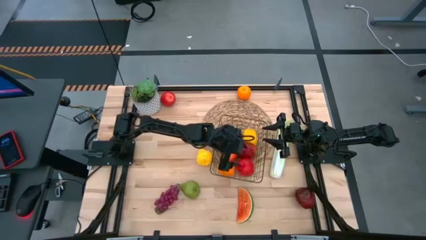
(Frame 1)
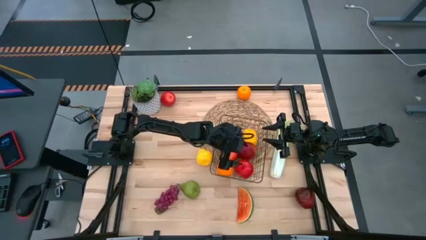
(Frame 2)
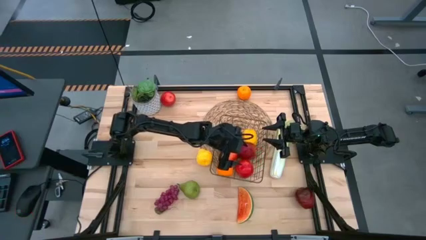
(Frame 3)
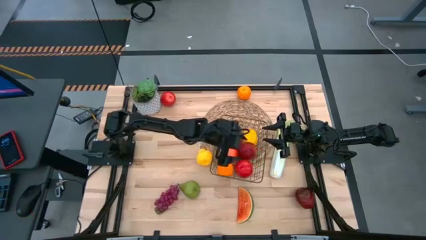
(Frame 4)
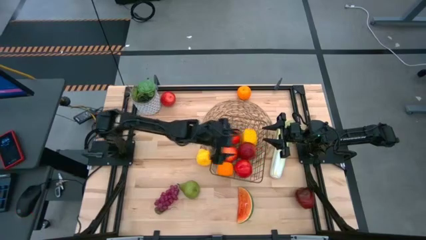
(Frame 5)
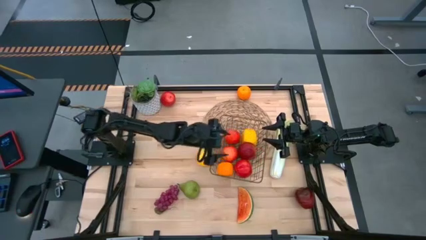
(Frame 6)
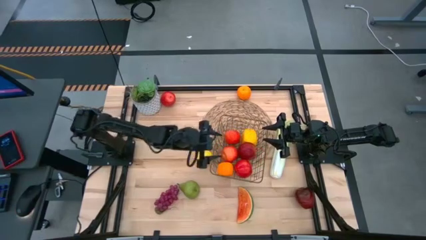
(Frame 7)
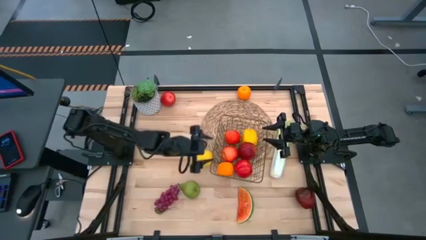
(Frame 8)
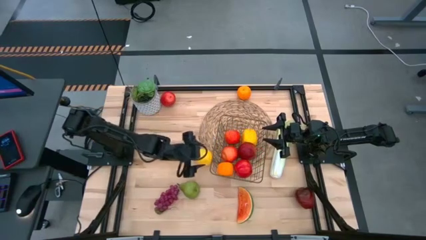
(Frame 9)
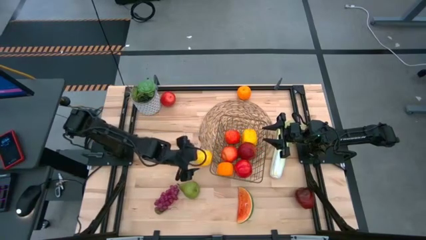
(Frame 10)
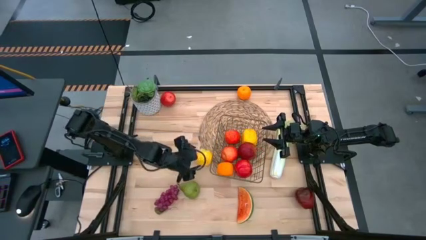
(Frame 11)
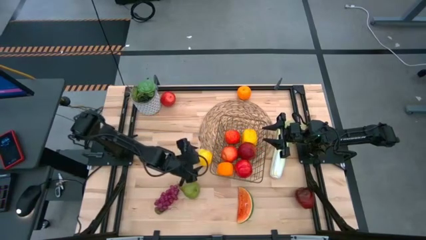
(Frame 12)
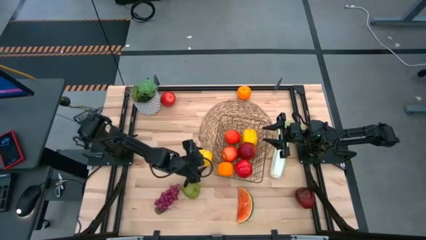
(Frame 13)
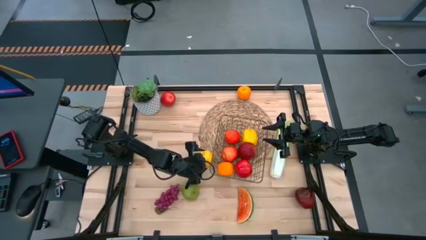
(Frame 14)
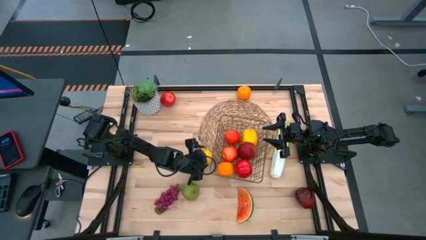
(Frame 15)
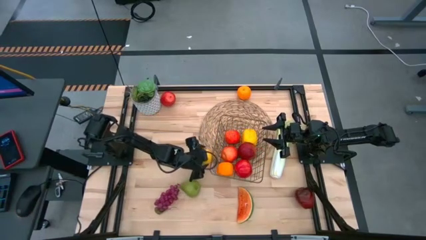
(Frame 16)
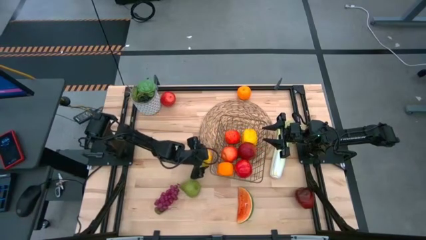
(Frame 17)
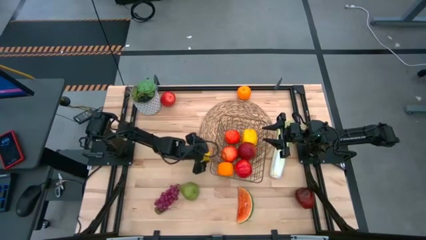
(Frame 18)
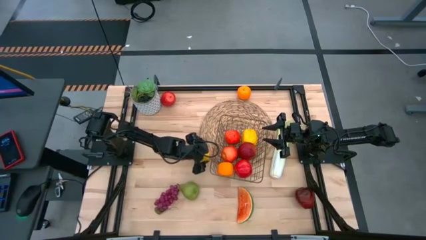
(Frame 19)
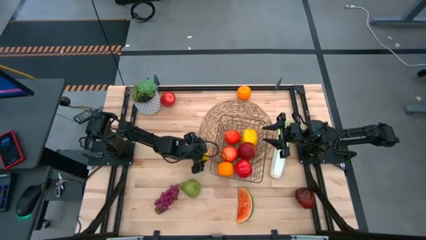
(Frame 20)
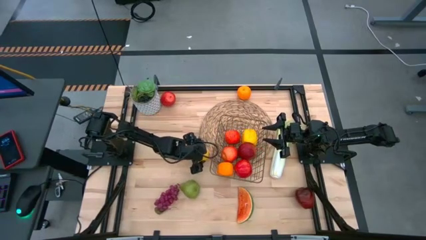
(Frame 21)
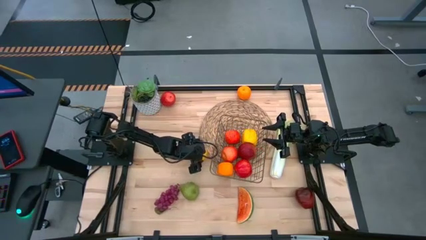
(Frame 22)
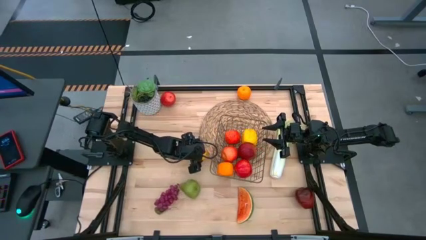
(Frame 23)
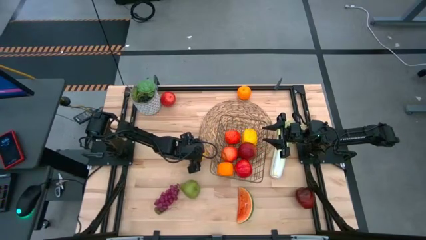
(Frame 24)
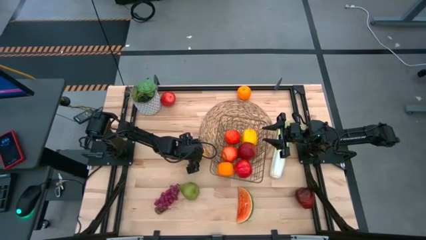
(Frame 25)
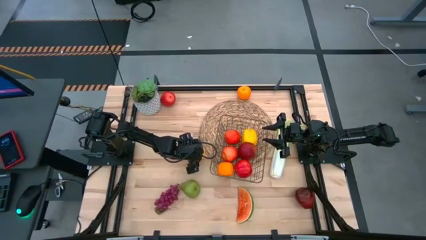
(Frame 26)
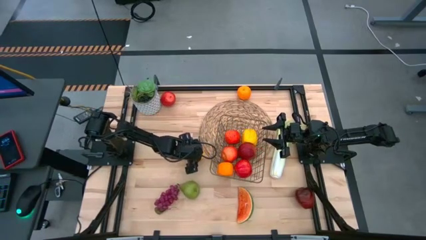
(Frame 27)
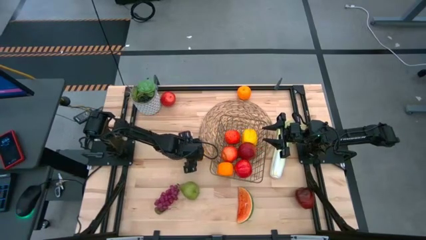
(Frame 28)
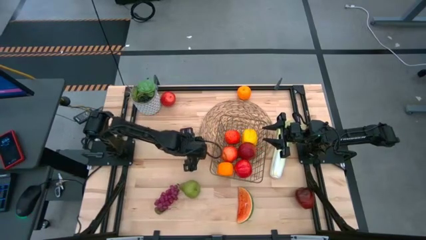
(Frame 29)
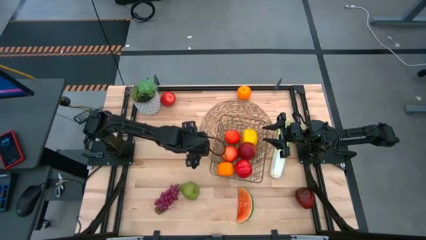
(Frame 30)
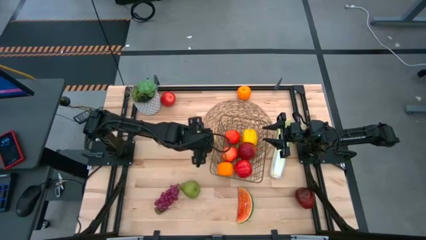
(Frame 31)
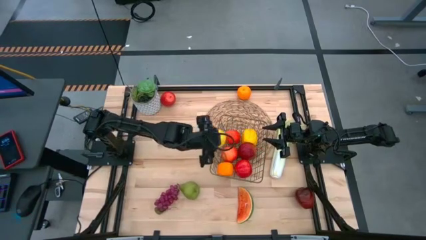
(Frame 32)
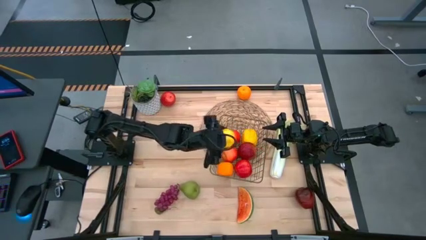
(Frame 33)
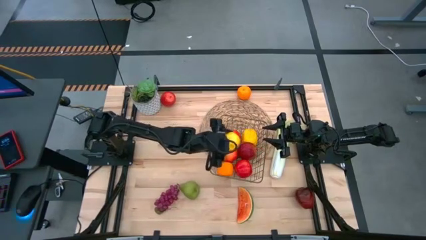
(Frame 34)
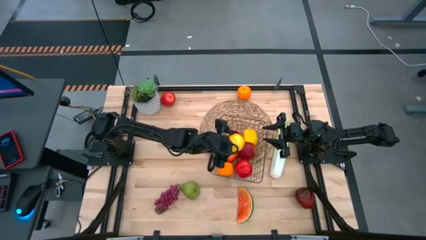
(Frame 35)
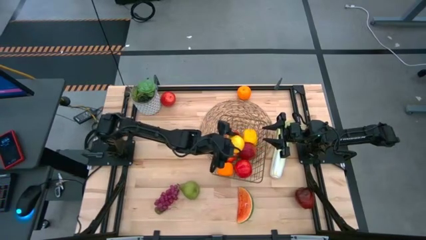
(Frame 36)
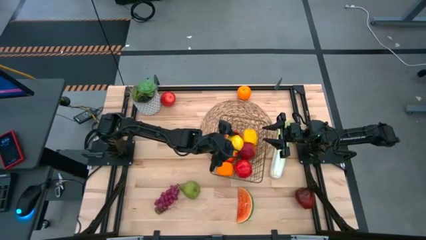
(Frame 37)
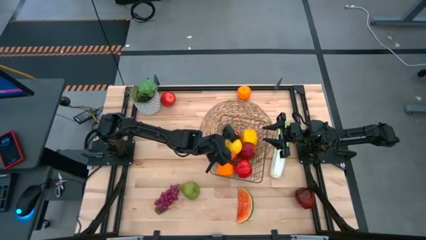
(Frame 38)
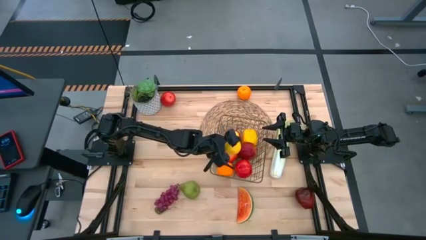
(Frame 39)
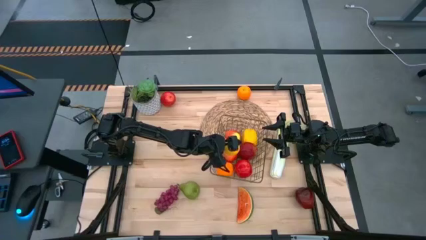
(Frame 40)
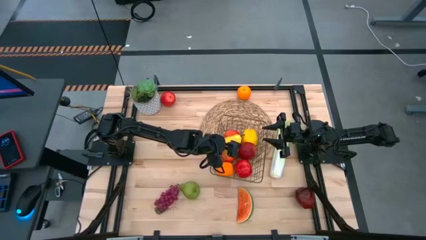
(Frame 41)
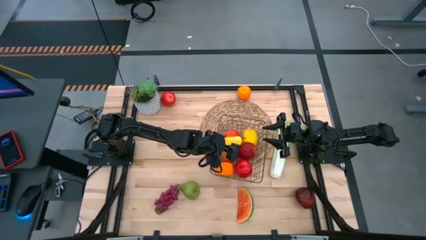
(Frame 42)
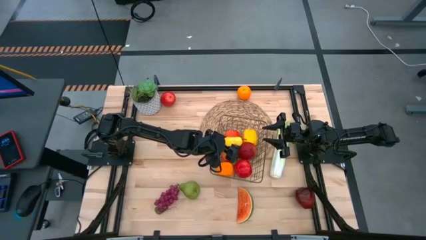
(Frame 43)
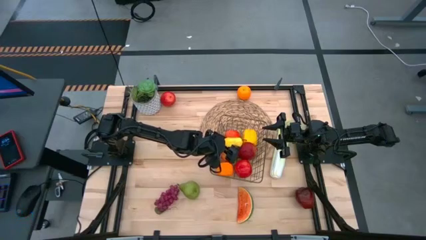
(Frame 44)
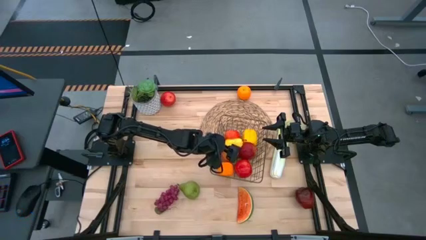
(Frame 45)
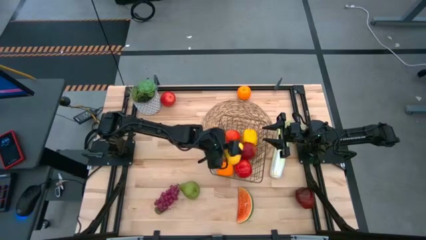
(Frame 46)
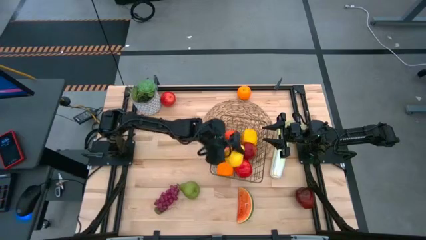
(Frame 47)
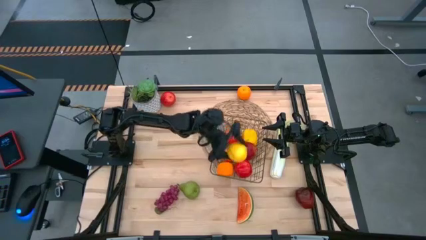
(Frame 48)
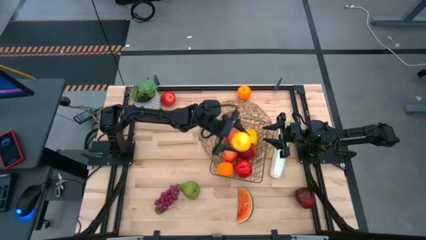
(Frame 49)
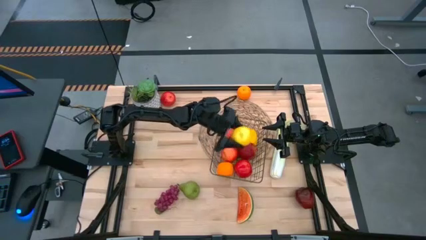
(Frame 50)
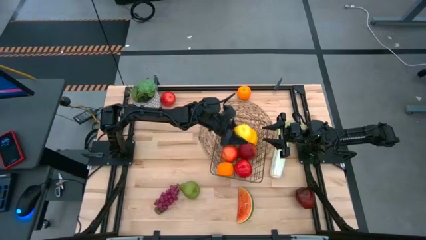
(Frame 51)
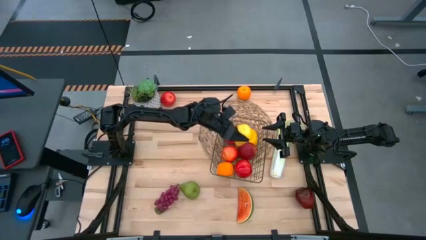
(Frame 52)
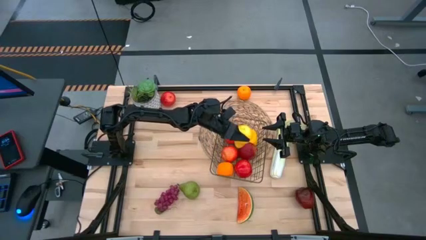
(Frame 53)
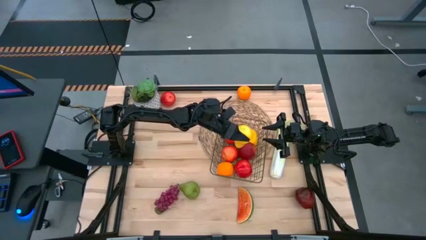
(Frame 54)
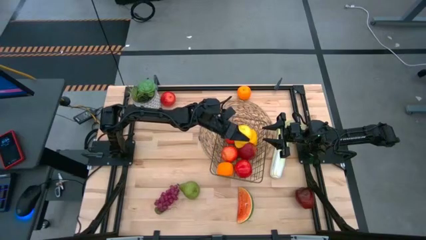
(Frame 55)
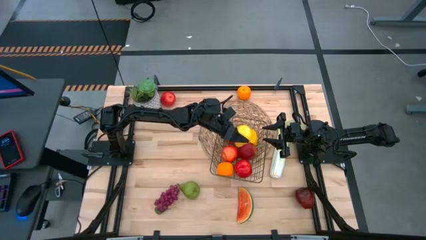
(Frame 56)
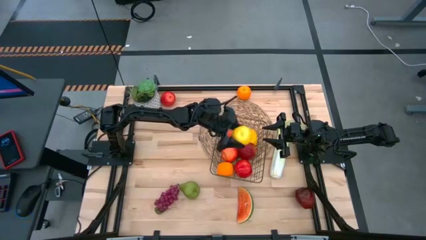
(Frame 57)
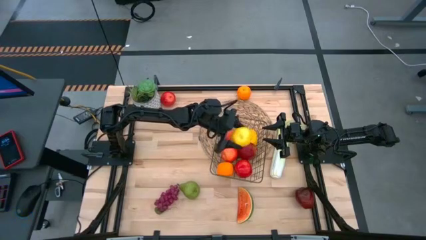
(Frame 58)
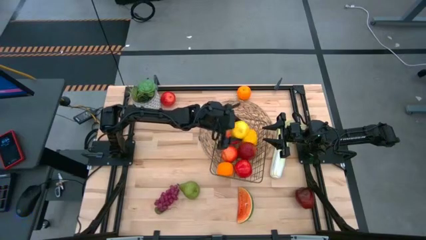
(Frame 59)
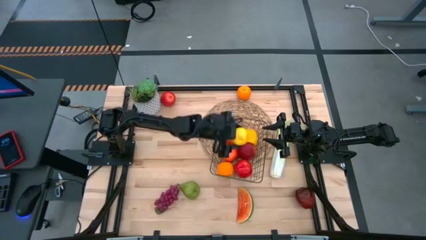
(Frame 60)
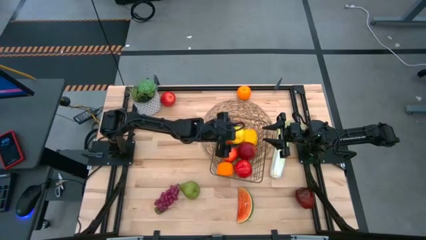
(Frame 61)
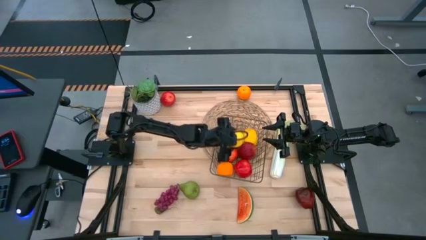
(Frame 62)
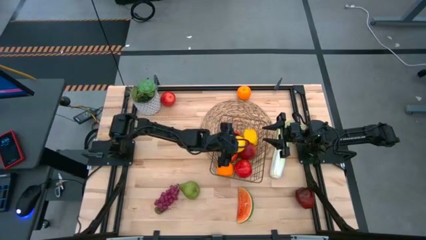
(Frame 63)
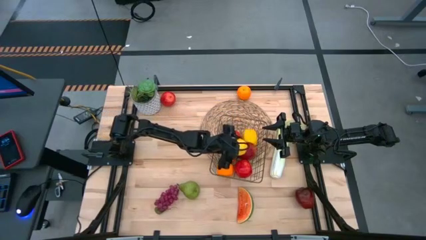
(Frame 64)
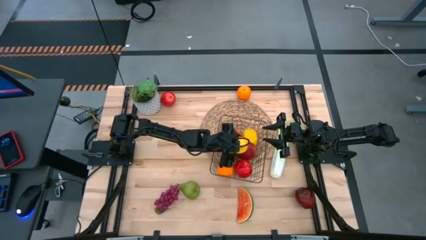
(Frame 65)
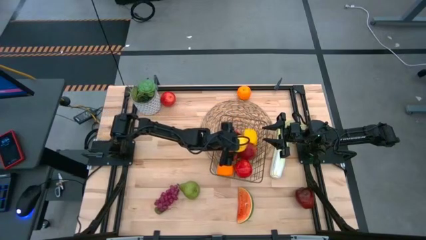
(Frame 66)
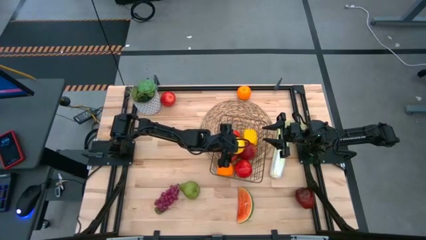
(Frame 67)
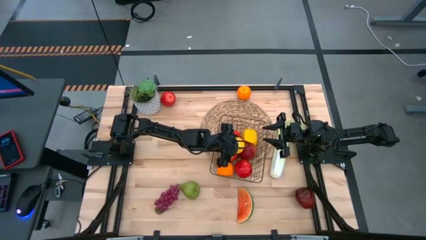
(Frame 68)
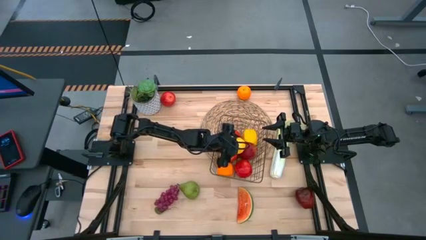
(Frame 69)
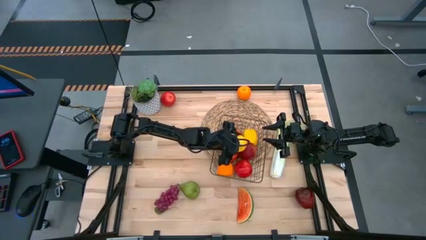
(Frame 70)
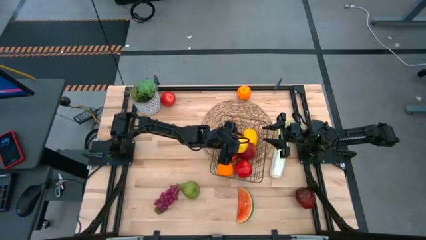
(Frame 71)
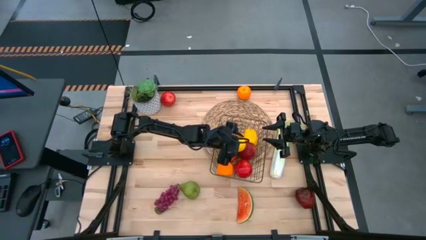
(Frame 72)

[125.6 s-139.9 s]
Task: Build produce basket
Put the yellow pear into the wire basket
